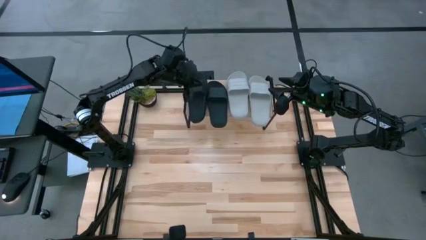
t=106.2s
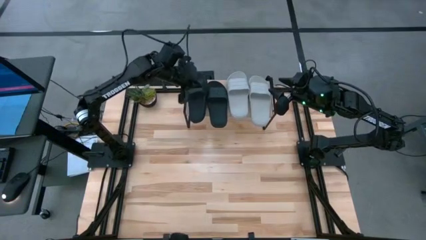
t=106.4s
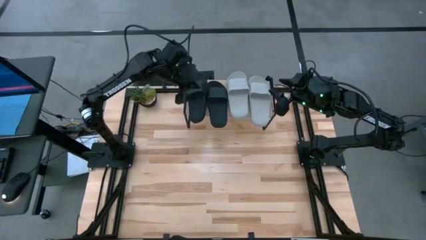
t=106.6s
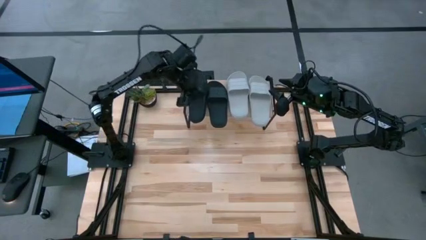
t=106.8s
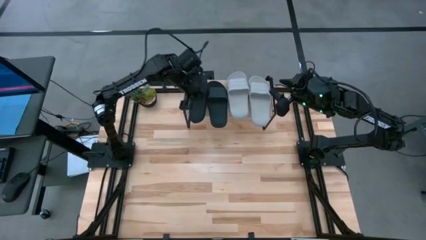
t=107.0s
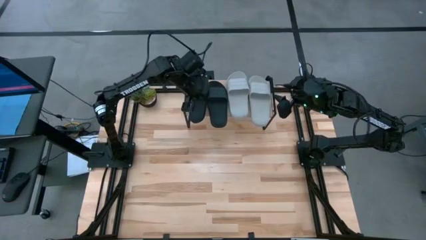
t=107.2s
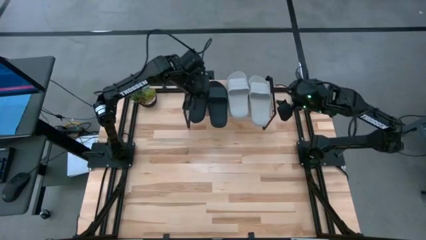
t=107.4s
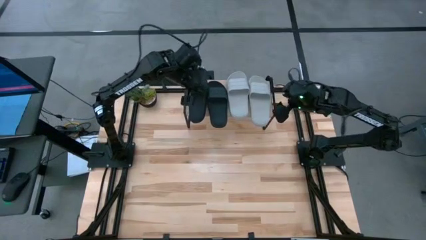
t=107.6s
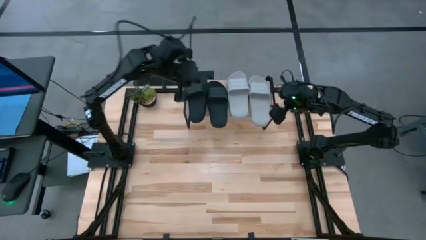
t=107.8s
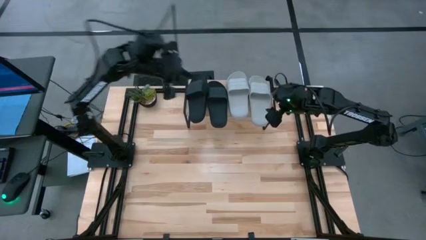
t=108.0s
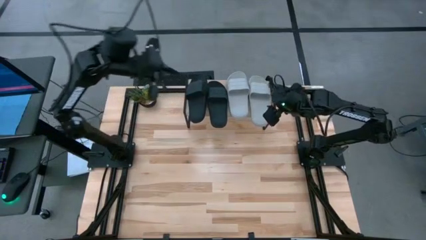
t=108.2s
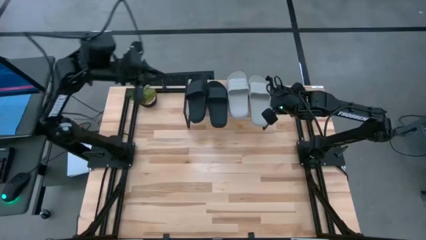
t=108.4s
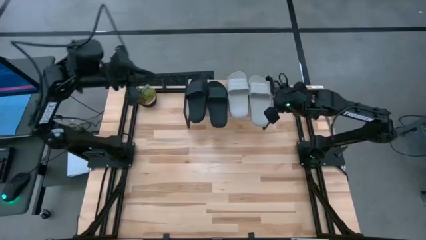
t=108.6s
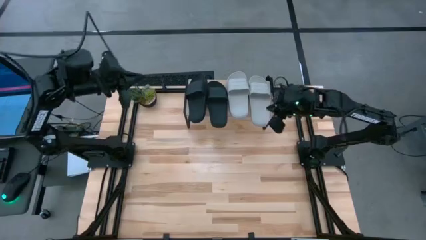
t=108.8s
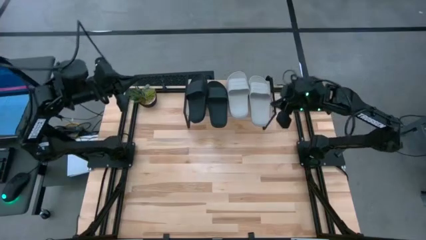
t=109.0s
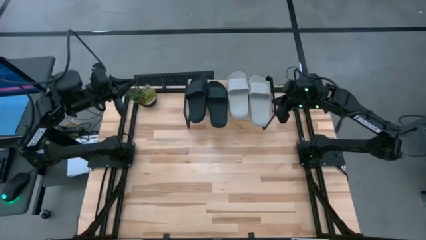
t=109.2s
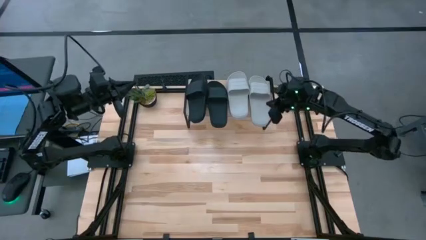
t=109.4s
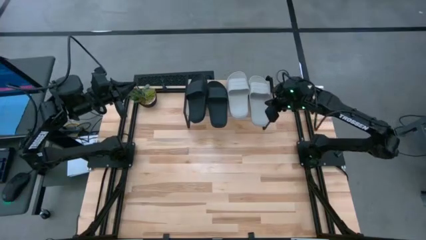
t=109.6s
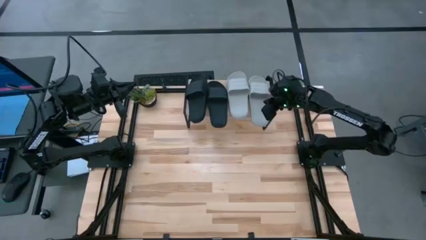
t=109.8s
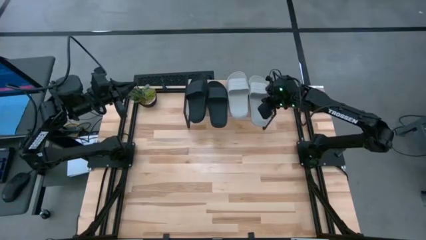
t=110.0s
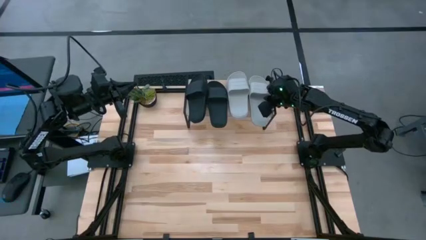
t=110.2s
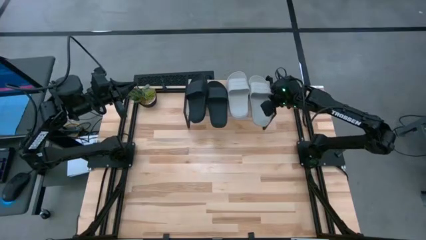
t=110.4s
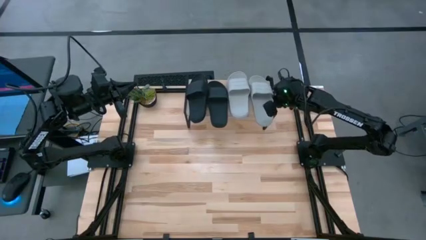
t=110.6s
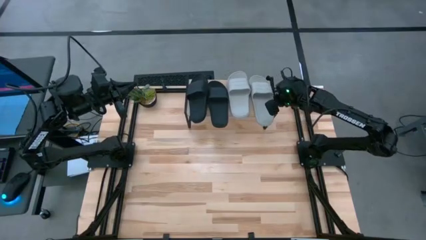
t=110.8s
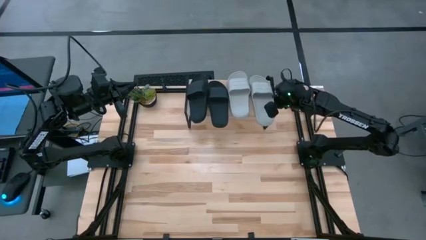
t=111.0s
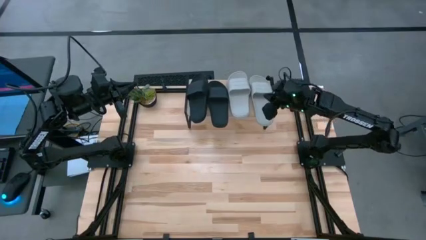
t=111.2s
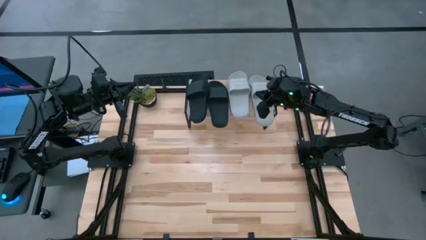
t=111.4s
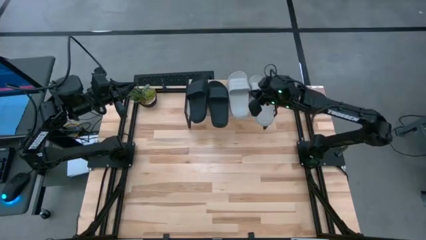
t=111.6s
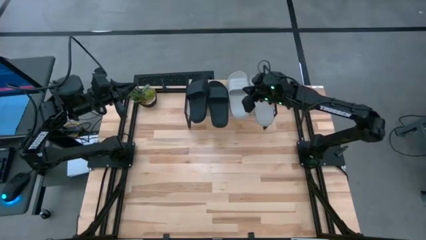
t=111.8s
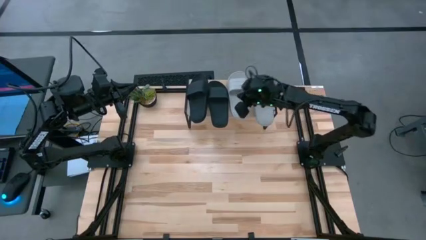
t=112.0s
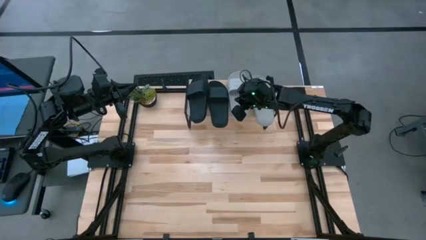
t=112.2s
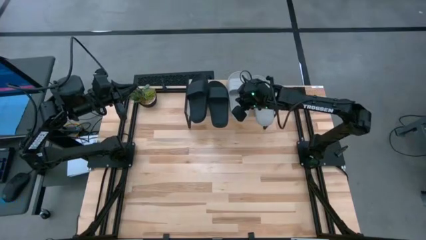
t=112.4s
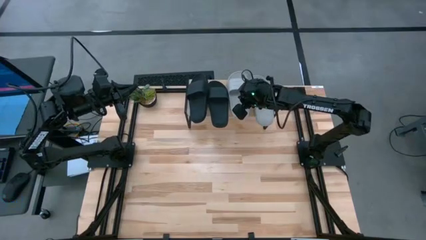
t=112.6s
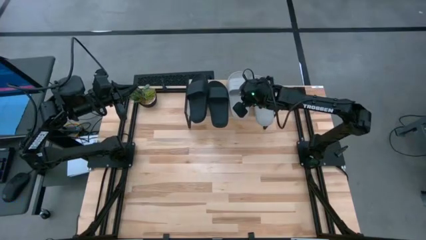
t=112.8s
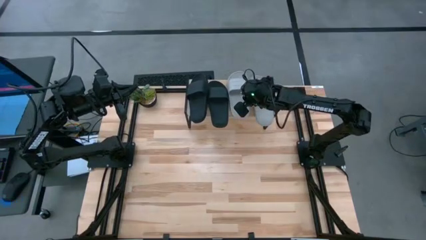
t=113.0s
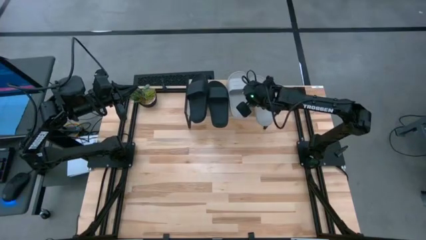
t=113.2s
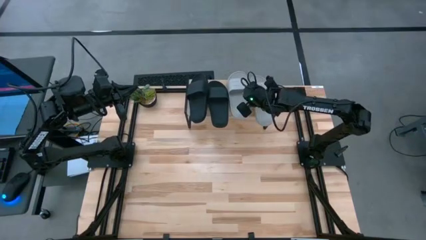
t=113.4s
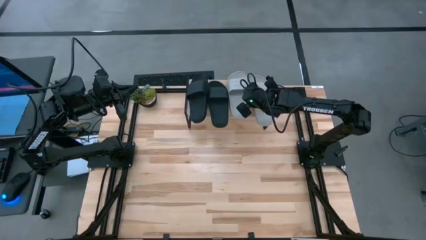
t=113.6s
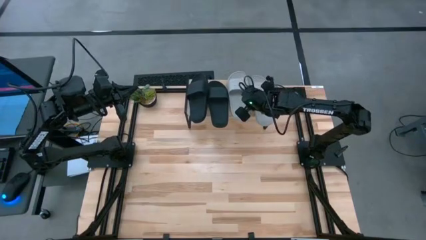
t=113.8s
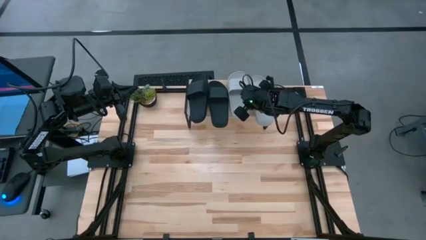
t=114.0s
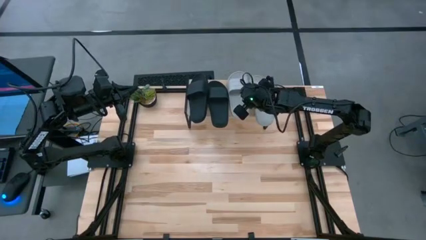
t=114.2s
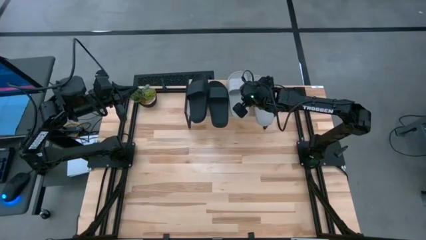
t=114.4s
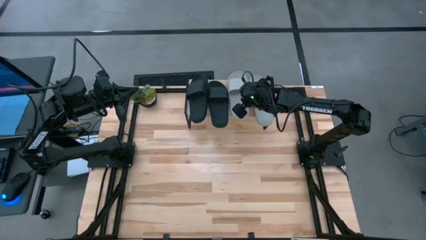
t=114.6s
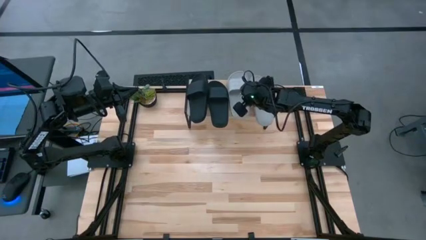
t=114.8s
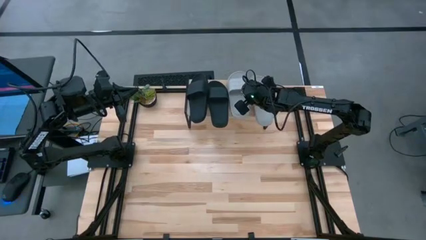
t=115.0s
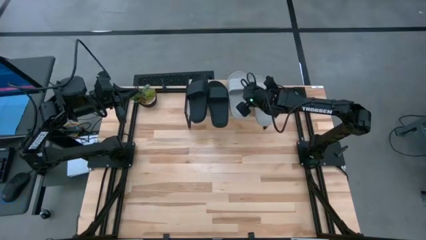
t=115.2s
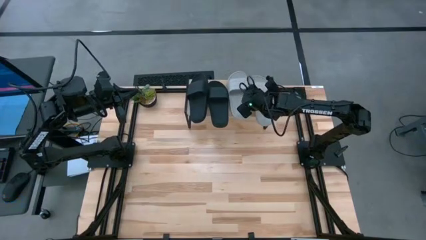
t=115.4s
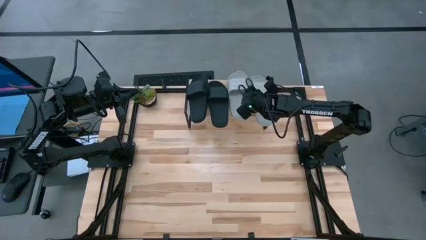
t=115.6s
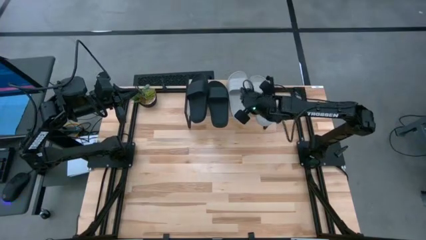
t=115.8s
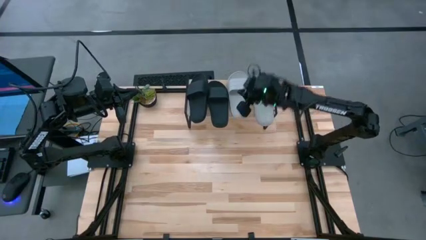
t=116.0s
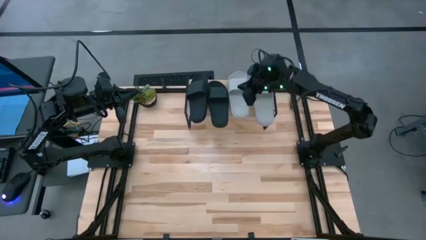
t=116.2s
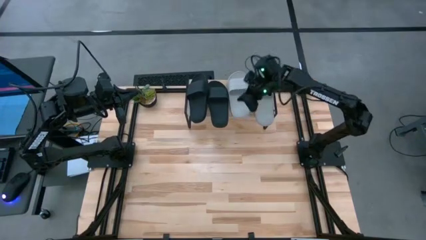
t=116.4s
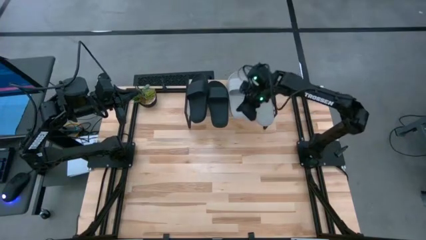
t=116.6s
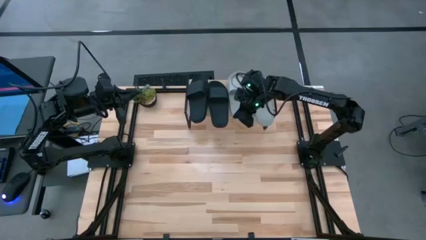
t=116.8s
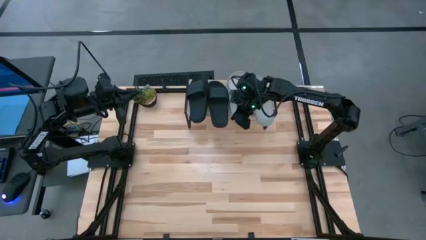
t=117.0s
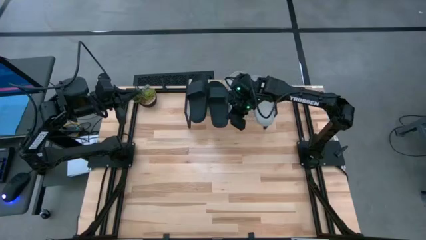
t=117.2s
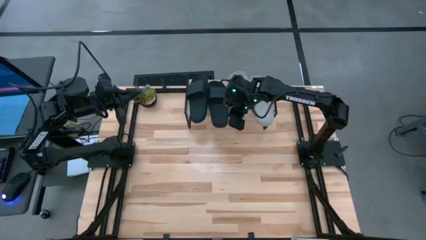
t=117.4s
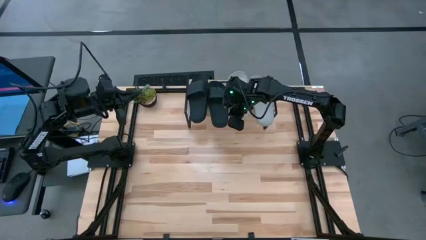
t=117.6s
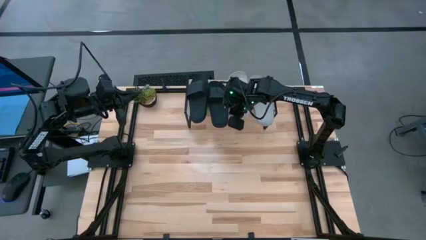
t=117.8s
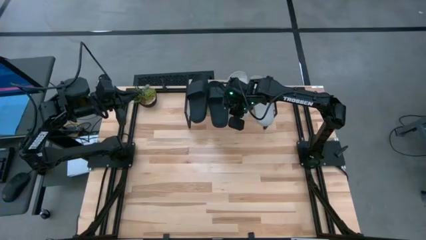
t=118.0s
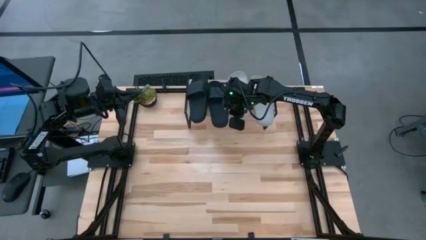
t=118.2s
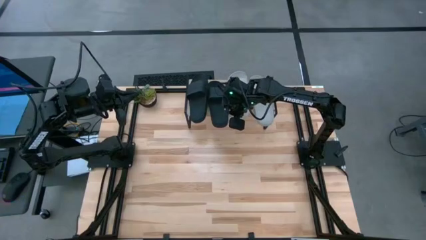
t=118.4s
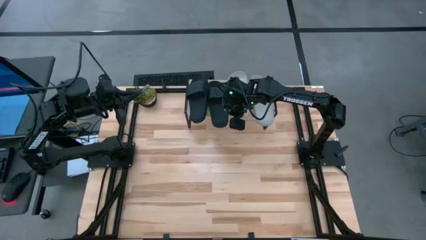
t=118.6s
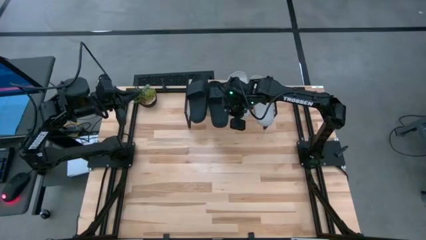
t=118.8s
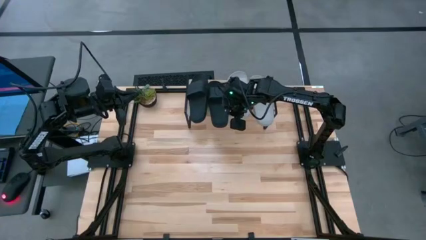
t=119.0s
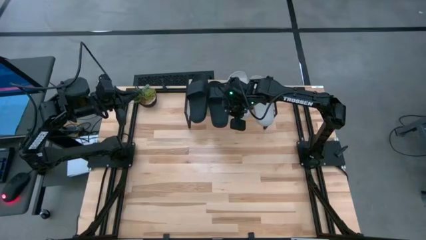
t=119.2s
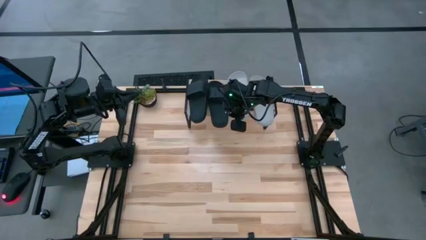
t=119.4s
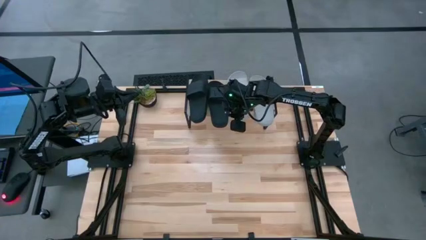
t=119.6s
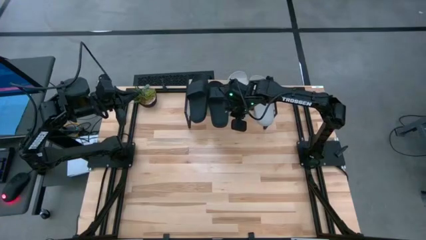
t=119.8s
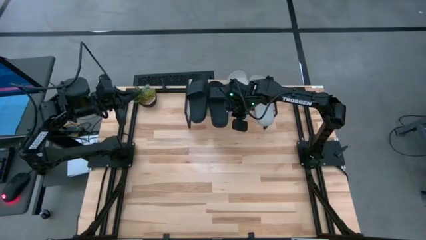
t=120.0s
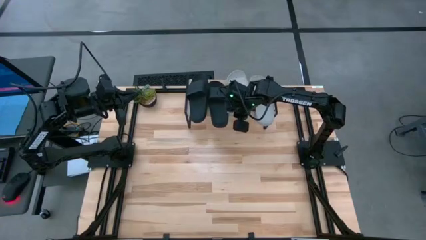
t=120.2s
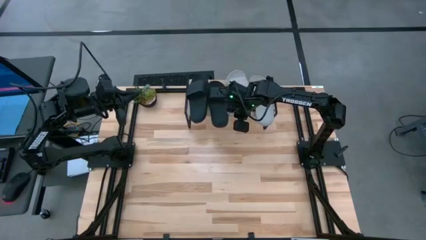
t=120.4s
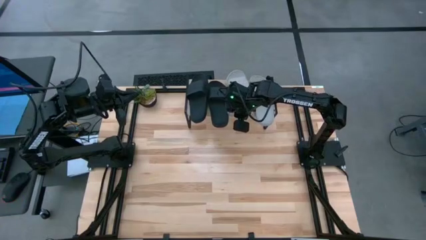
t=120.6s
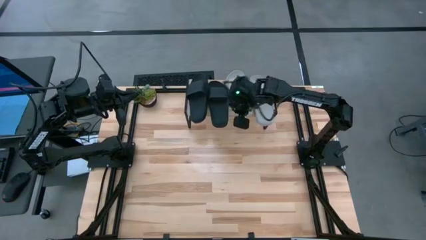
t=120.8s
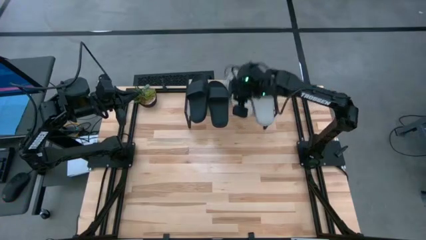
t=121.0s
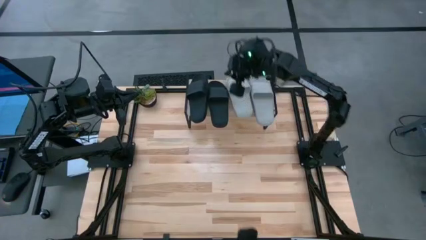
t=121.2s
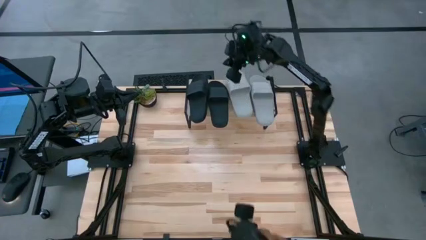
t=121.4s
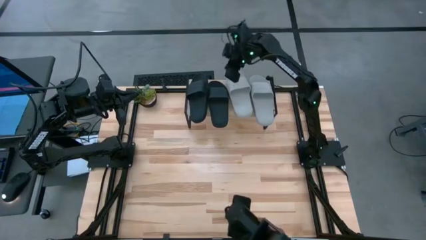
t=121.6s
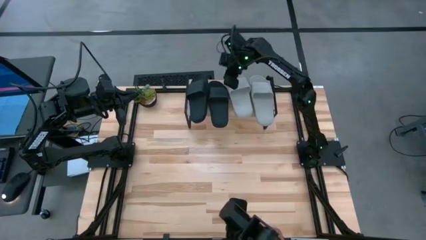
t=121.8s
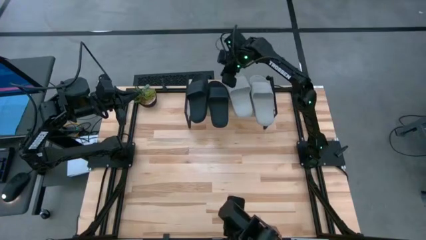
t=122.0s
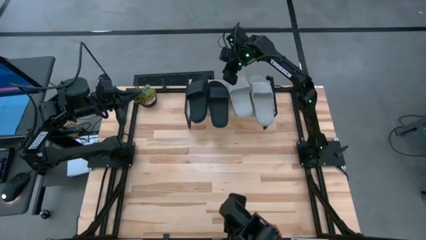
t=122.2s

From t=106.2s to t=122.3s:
Task: Pick and place slides into the shelf
Adjust the slides on the shelf
